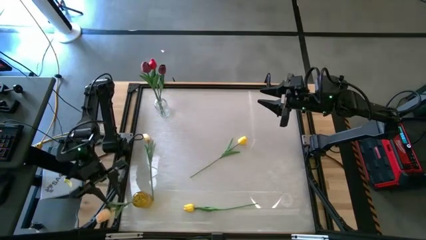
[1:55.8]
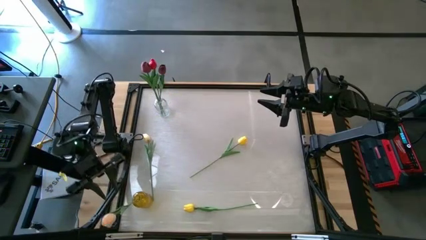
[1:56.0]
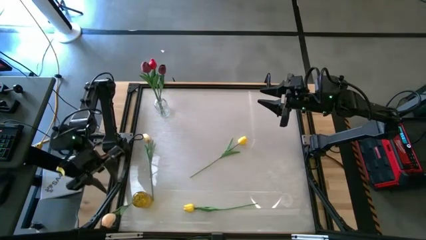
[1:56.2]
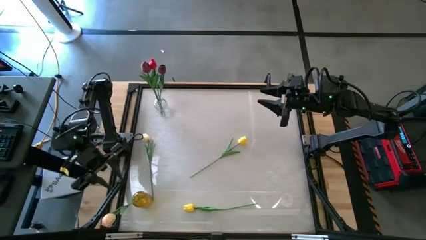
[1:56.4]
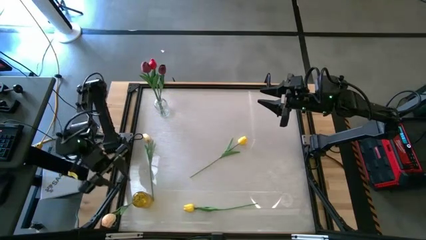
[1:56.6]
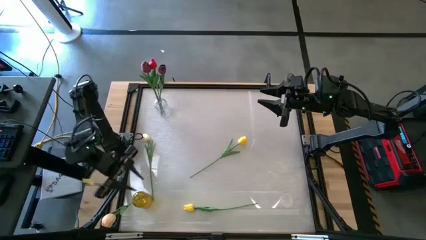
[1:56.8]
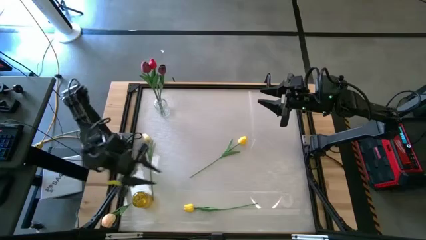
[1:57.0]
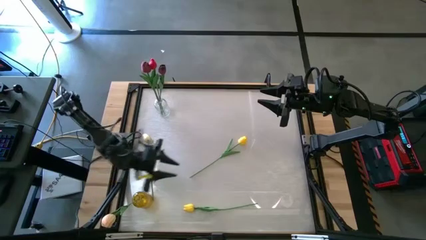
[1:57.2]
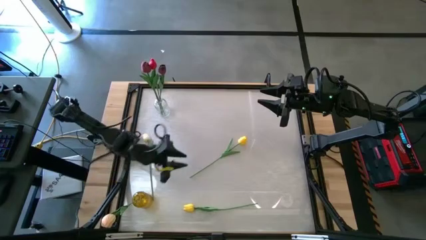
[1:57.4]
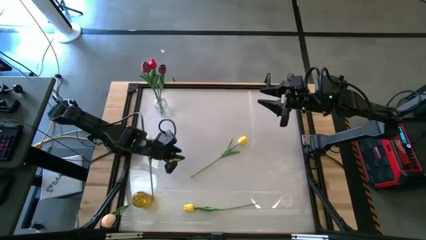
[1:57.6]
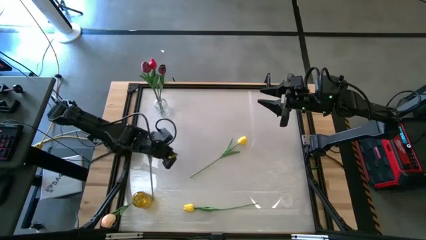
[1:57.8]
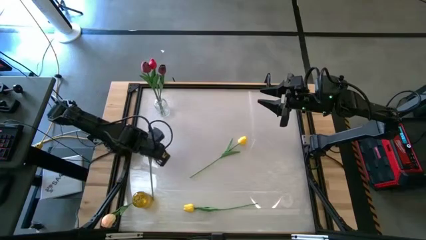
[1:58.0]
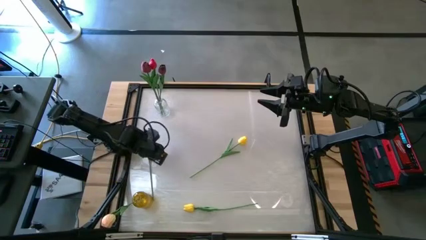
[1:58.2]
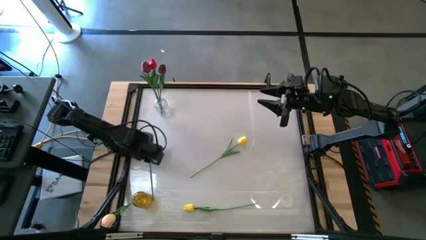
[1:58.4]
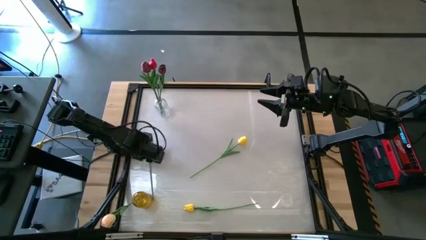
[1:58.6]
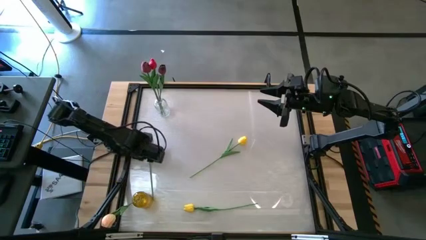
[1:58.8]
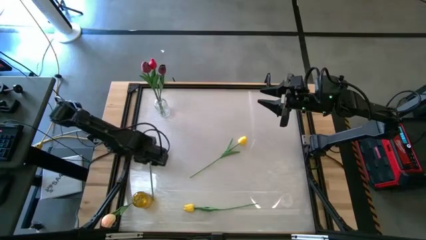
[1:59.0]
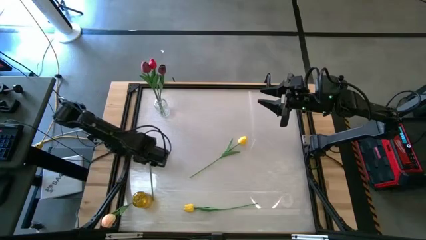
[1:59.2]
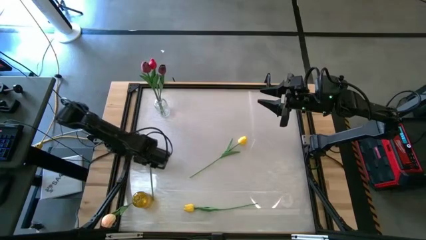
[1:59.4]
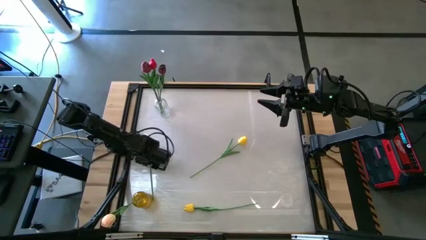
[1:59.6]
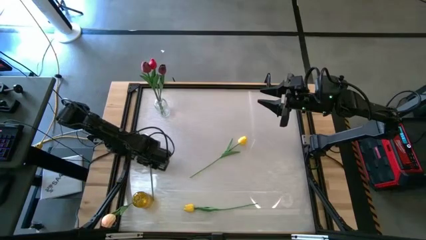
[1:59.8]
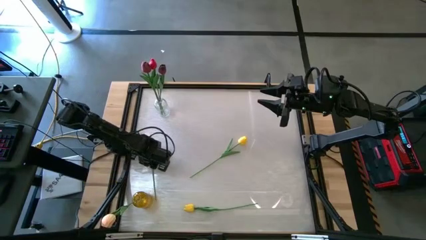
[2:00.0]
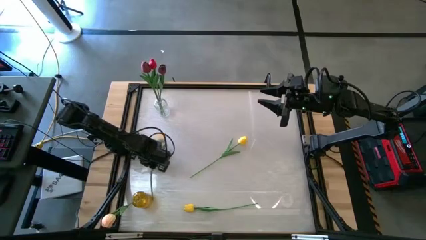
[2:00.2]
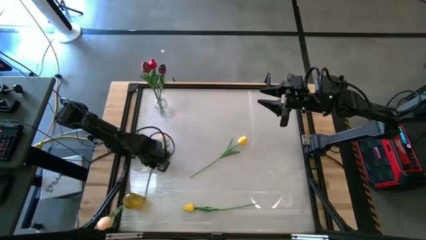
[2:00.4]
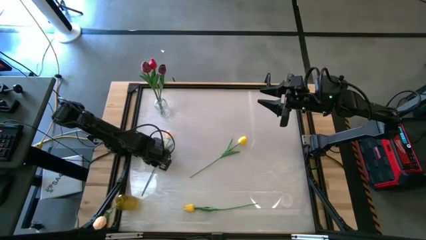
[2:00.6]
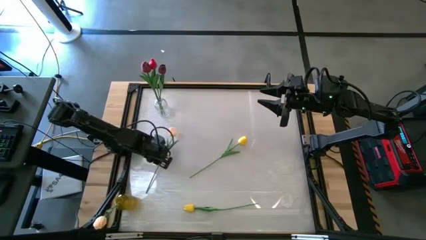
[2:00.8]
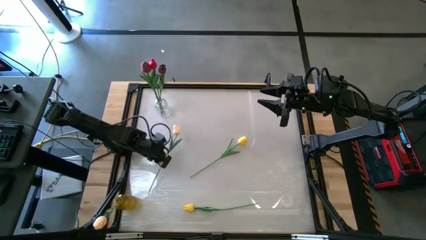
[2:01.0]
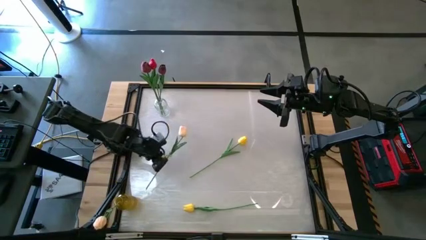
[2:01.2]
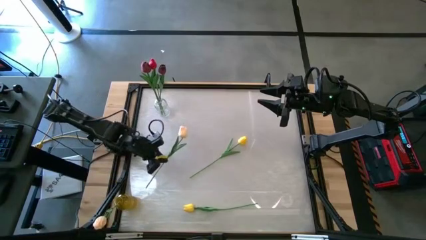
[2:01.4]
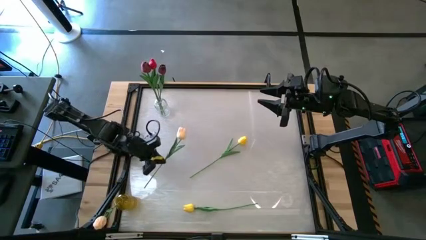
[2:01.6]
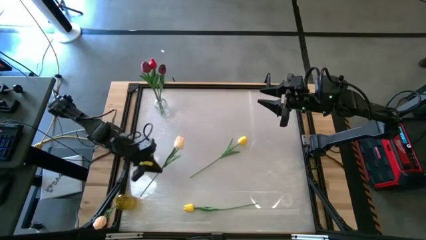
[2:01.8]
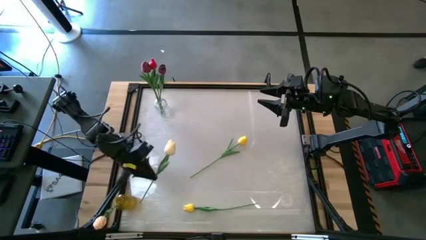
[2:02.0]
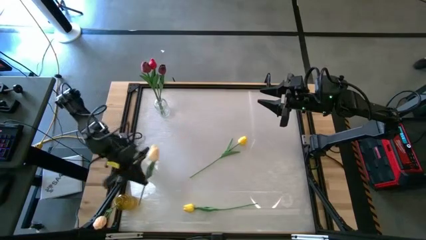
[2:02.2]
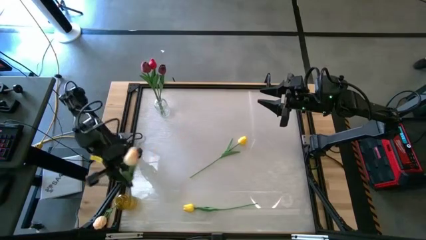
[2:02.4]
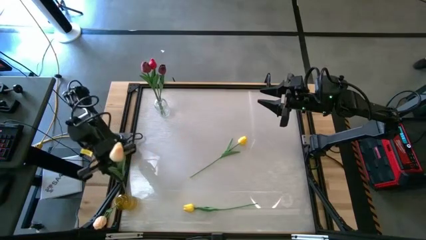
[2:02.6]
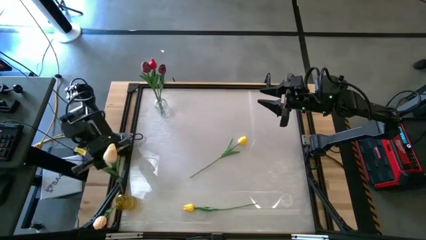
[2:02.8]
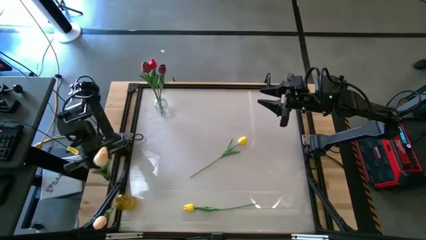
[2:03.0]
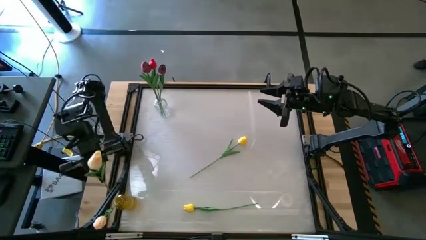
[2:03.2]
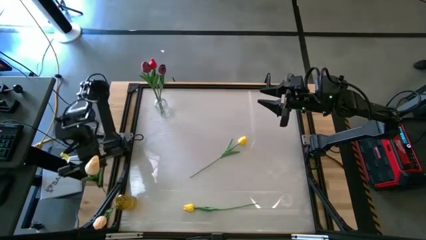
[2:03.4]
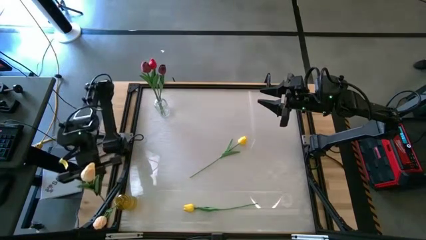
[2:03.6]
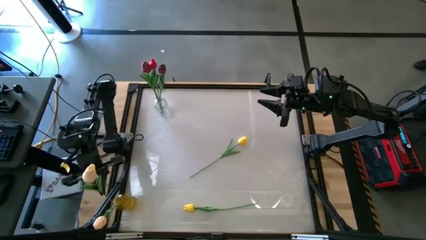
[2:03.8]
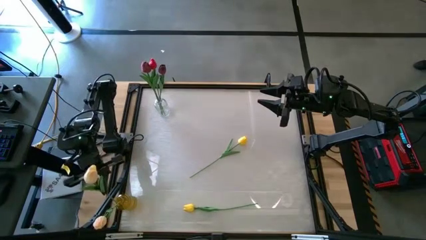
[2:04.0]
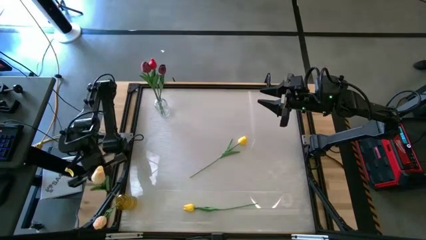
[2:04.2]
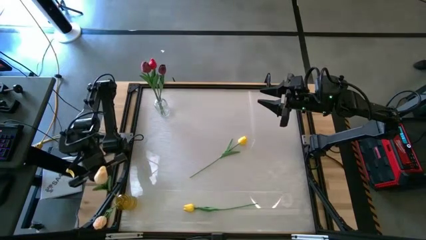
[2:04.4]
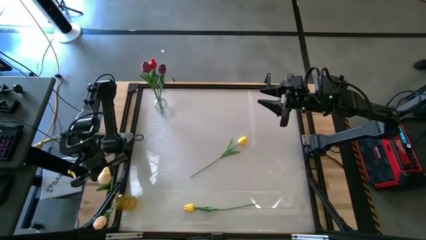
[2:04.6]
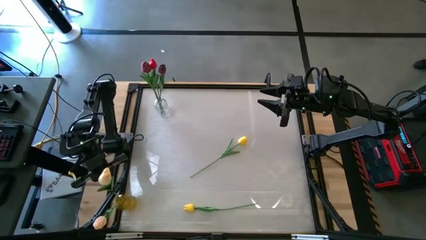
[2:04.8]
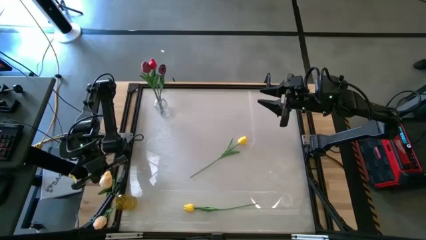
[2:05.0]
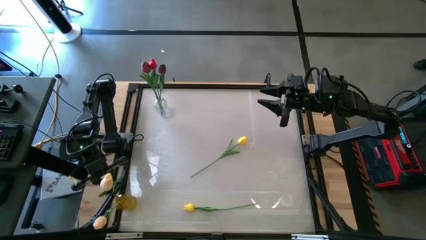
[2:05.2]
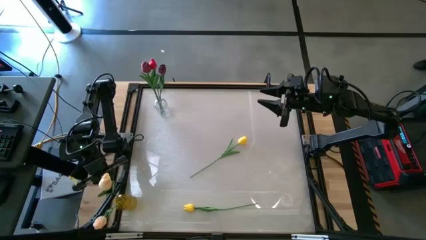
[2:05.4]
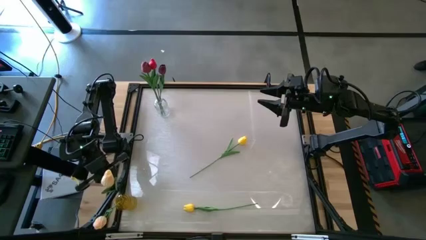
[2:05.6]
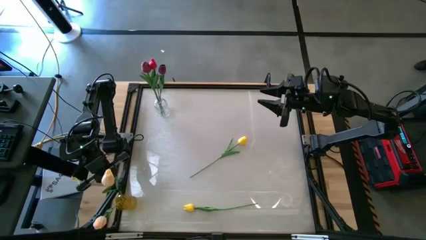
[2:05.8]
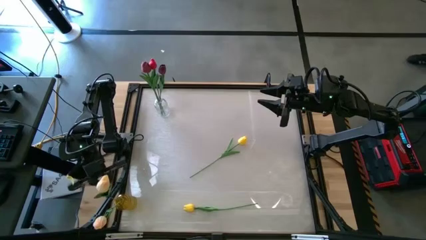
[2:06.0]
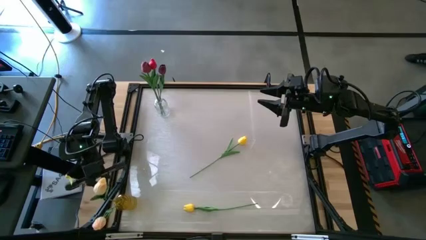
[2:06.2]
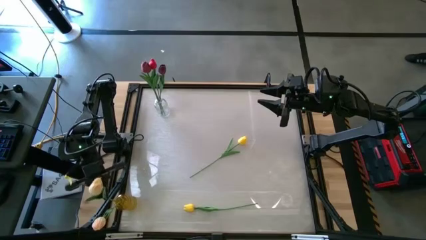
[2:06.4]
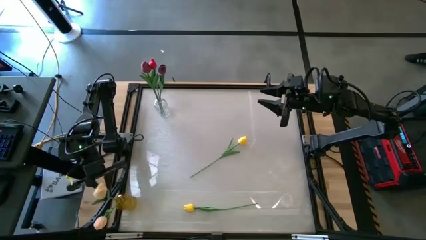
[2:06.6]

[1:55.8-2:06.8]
Task: Sort flowers into vase by color
Put the white flower into the yellow vase

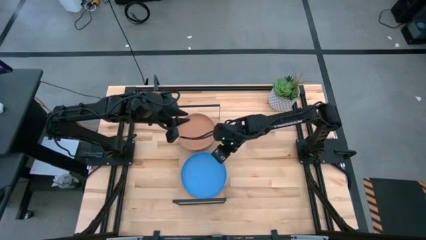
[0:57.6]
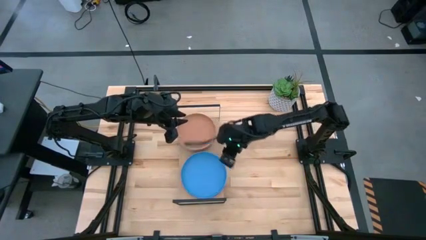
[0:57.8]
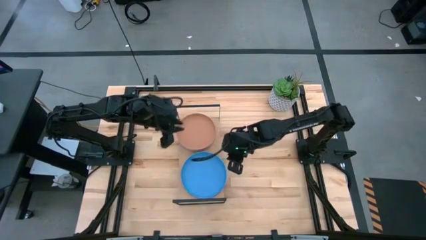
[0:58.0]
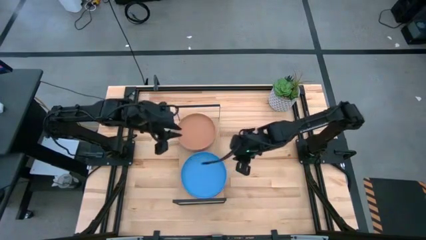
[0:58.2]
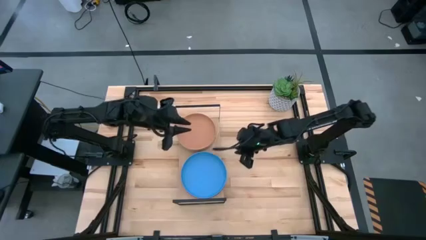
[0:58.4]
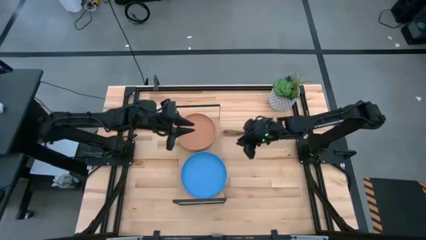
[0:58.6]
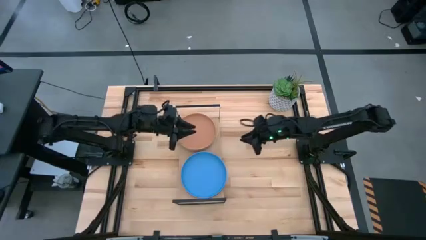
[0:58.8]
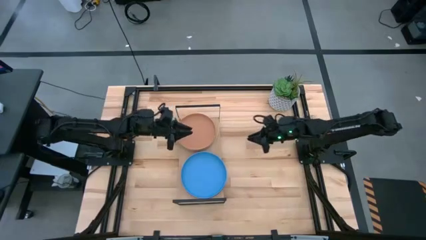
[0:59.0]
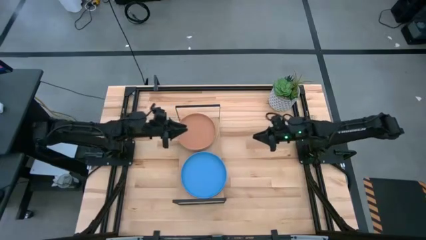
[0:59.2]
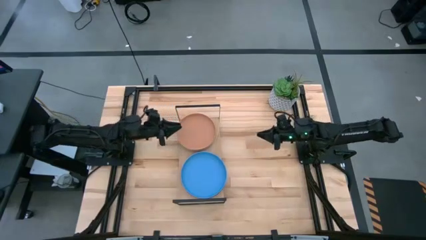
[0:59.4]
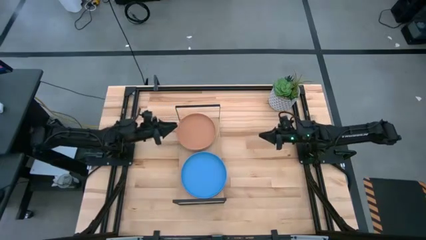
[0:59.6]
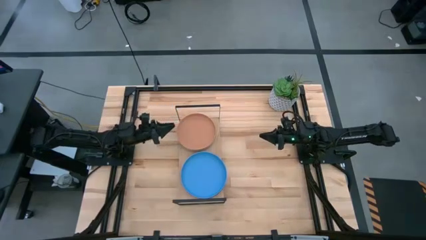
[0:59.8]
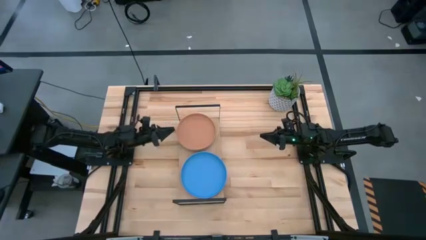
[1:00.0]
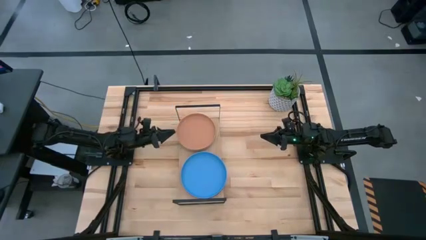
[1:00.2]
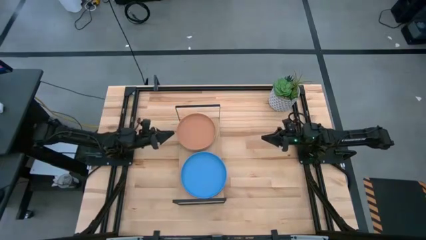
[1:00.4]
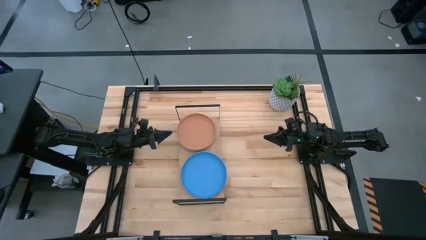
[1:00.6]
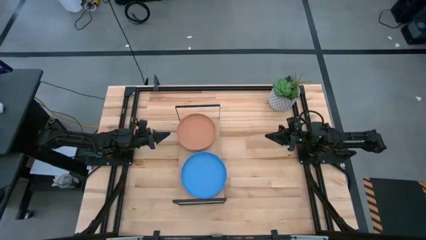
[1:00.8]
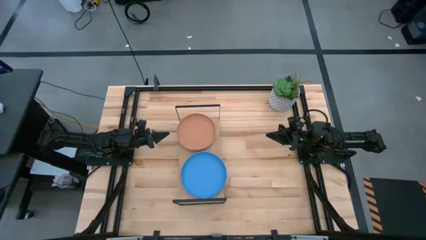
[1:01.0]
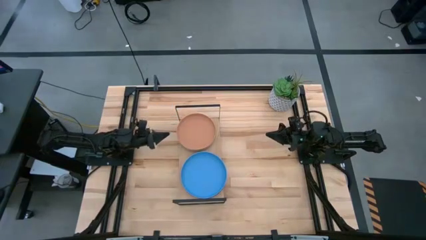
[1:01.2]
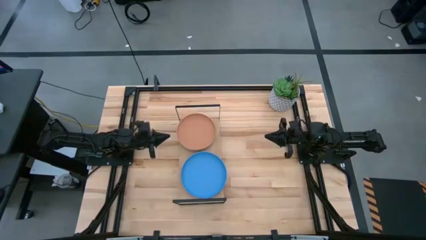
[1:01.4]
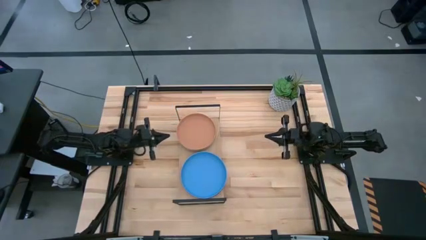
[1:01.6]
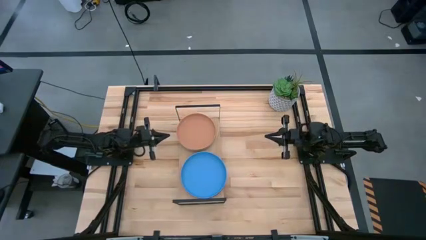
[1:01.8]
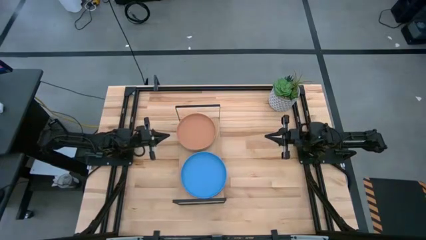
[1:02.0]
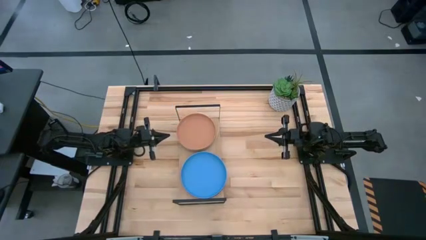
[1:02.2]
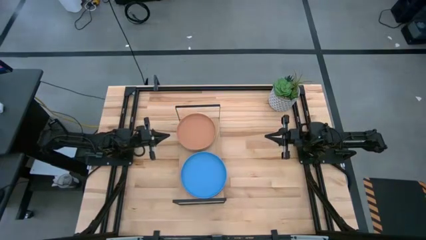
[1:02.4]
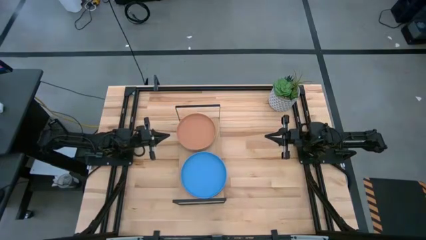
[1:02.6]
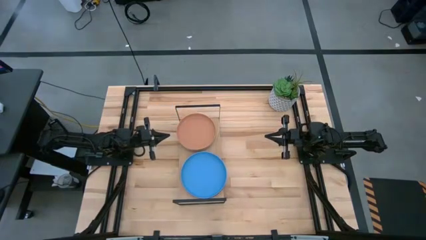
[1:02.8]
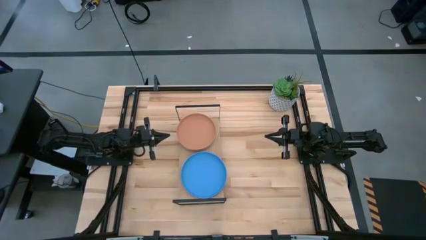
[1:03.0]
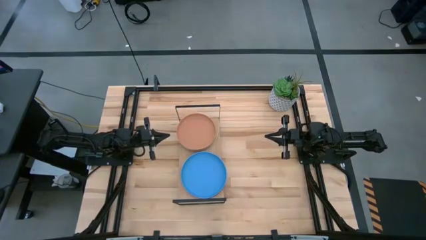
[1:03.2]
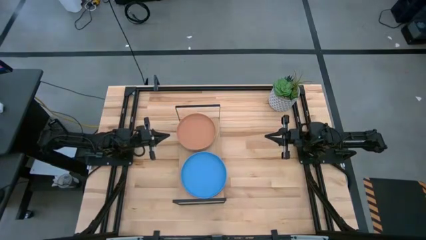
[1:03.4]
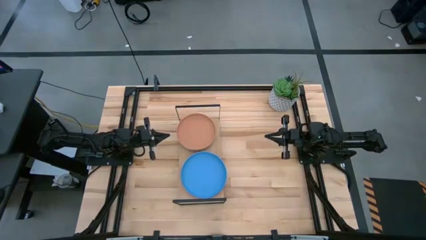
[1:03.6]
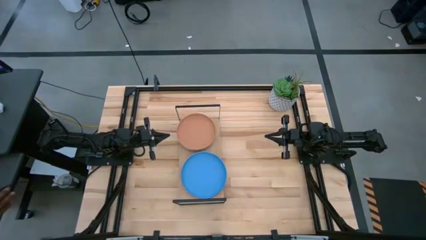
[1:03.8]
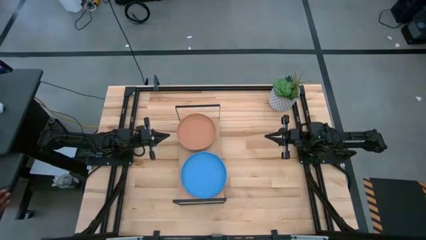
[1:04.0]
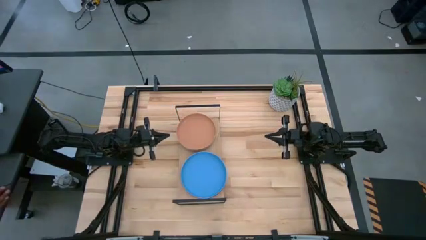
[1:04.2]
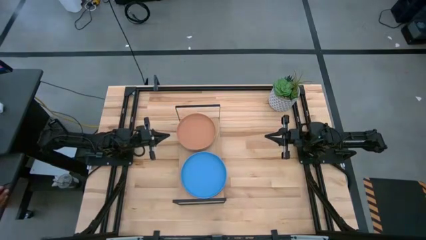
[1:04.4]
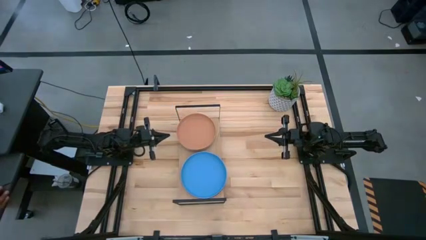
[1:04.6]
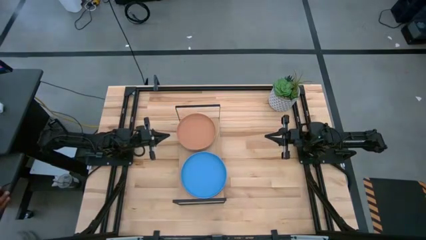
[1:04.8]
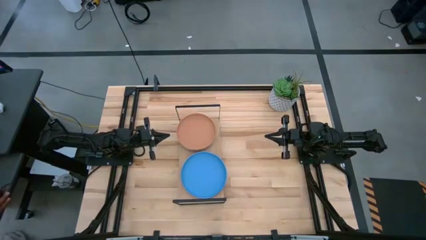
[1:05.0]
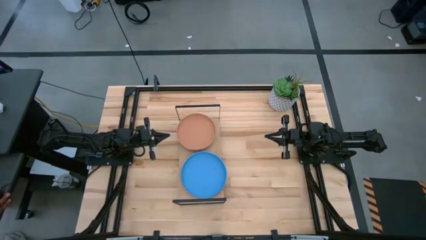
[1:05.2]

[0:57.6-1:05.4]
Task: Place and stack plates onto a shelf
Return to Home Position
